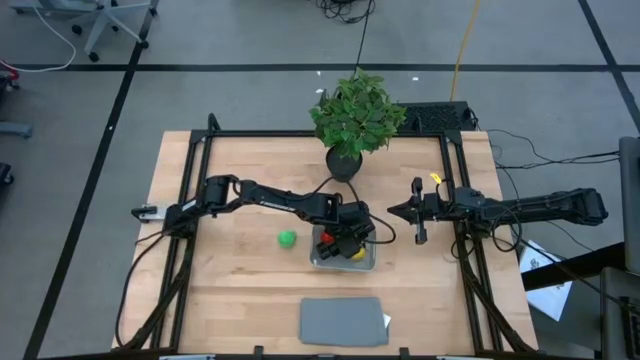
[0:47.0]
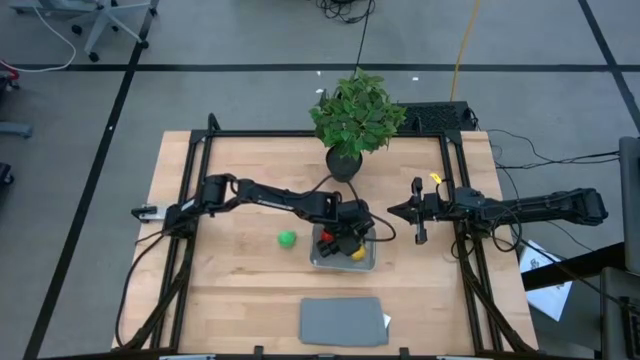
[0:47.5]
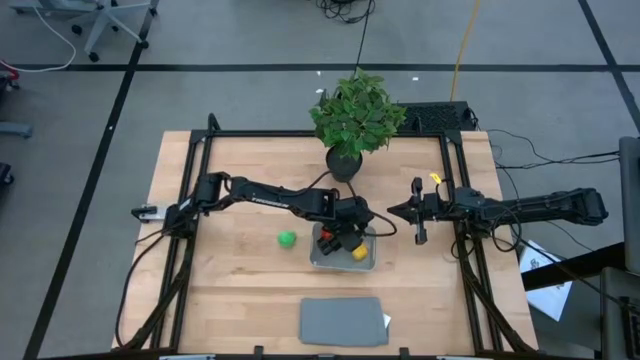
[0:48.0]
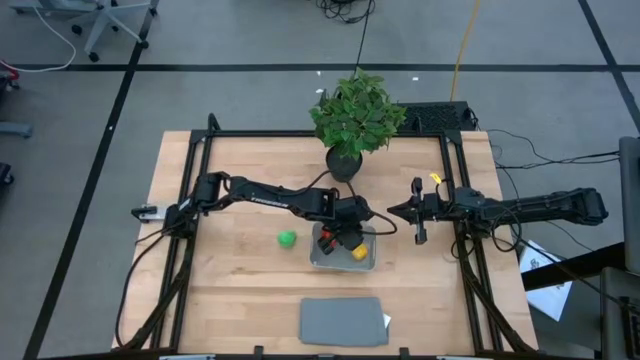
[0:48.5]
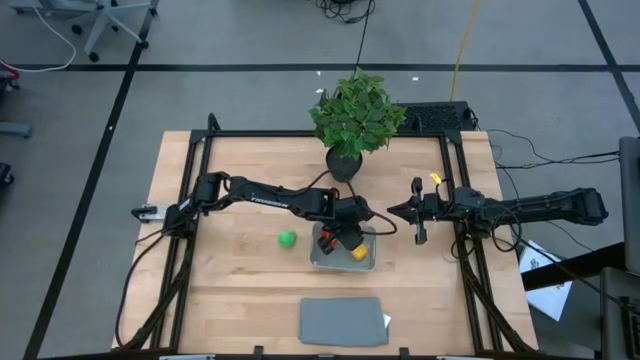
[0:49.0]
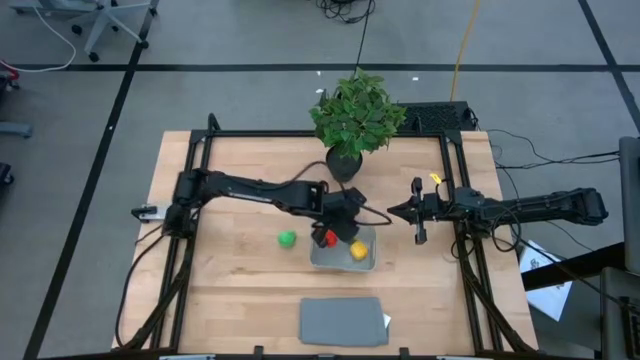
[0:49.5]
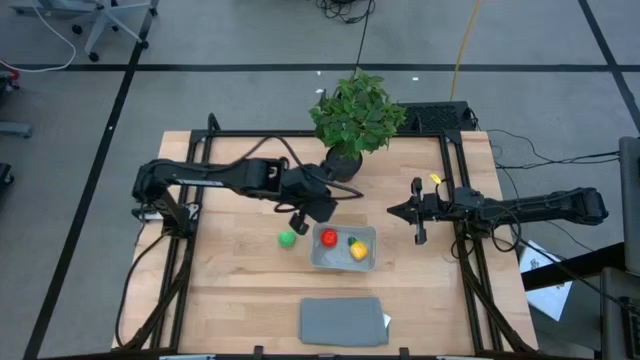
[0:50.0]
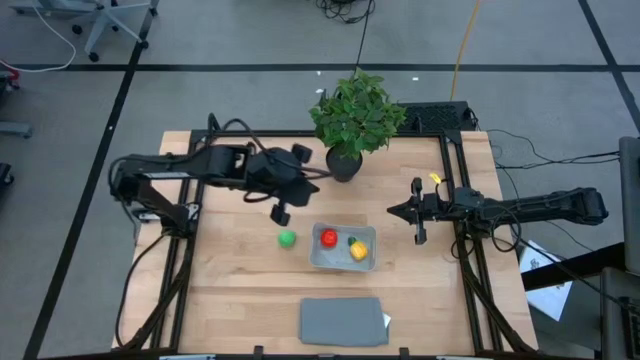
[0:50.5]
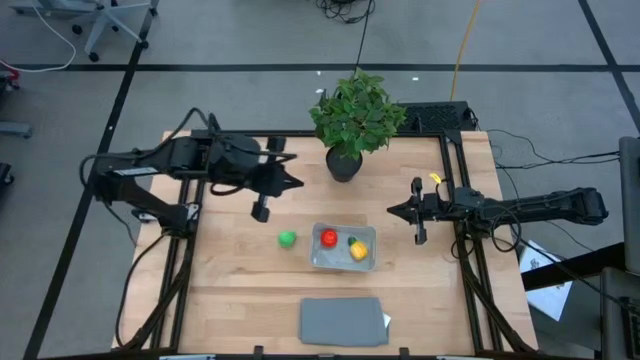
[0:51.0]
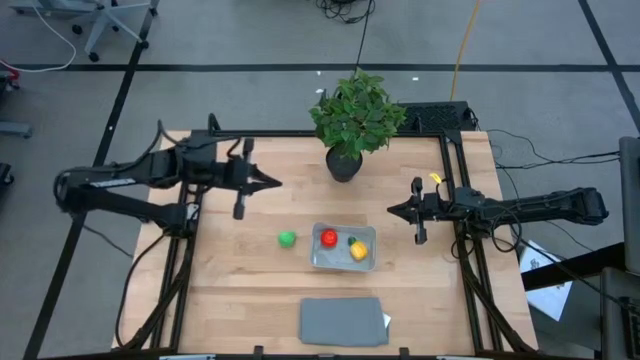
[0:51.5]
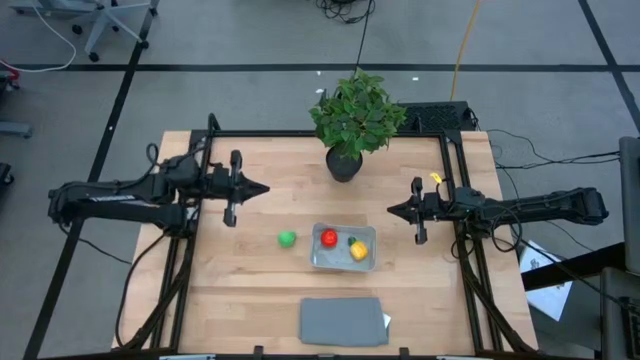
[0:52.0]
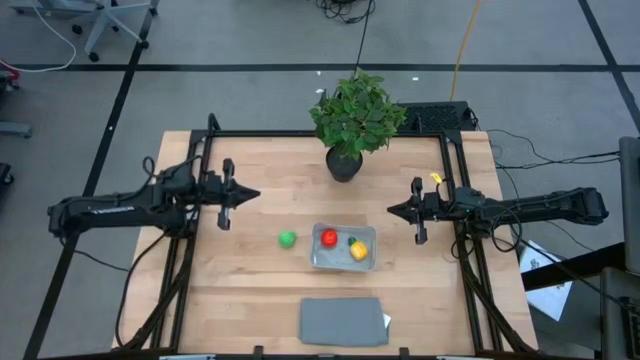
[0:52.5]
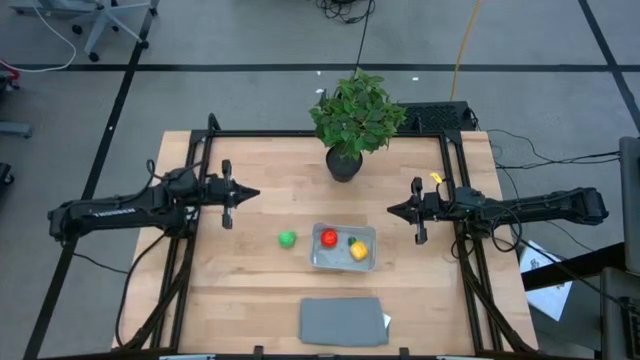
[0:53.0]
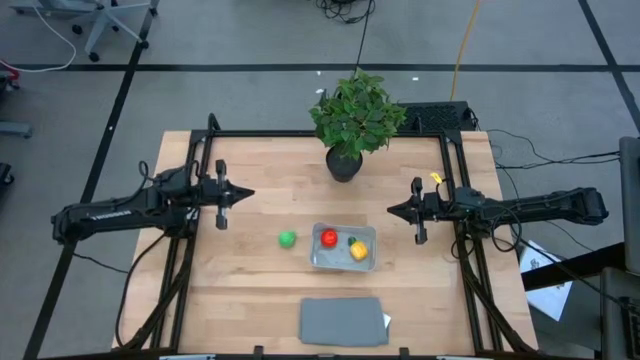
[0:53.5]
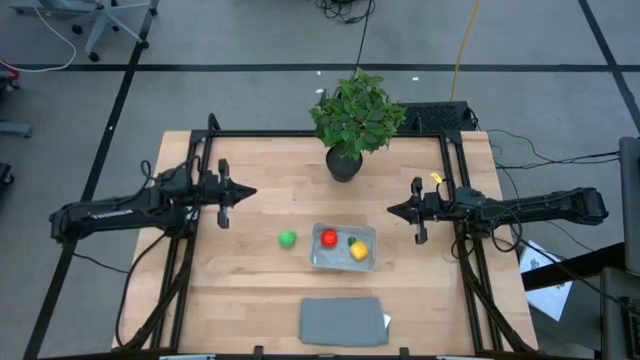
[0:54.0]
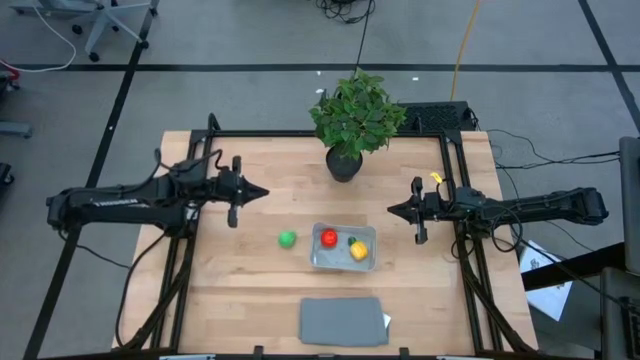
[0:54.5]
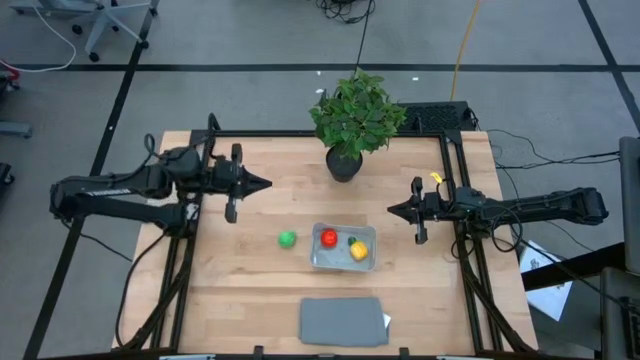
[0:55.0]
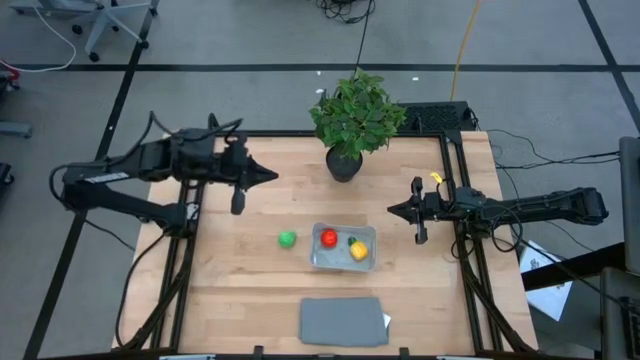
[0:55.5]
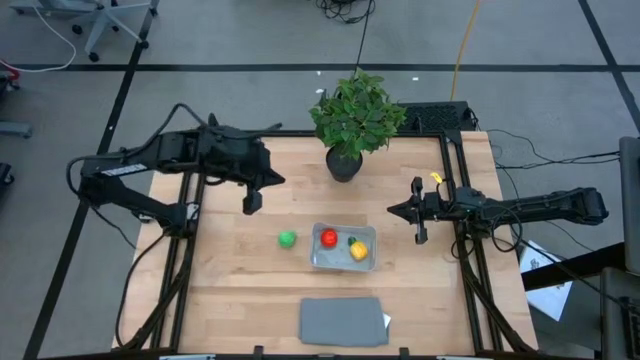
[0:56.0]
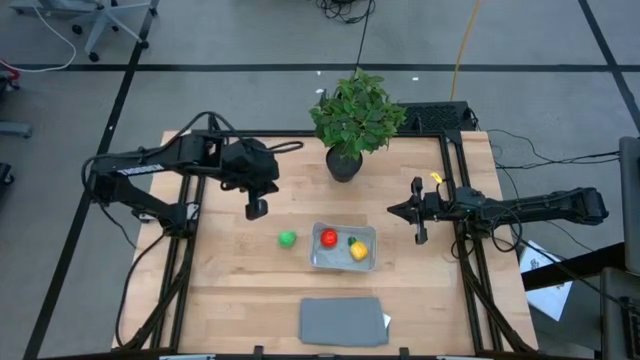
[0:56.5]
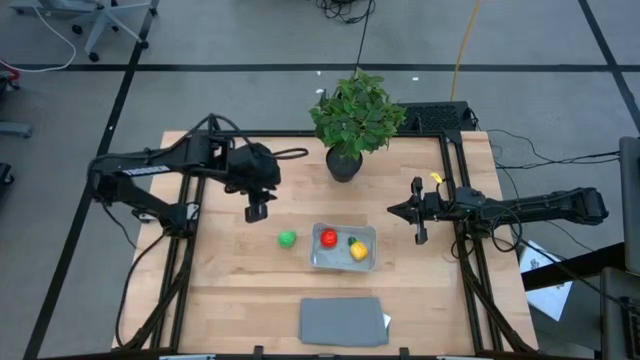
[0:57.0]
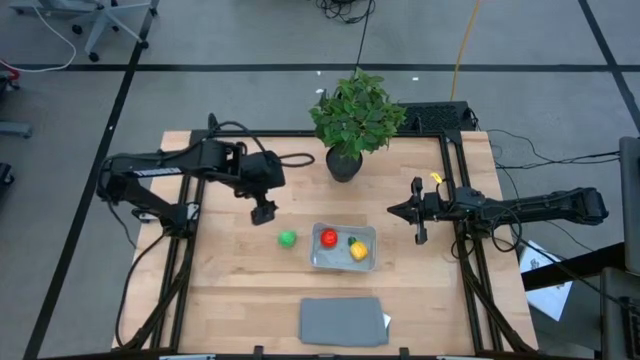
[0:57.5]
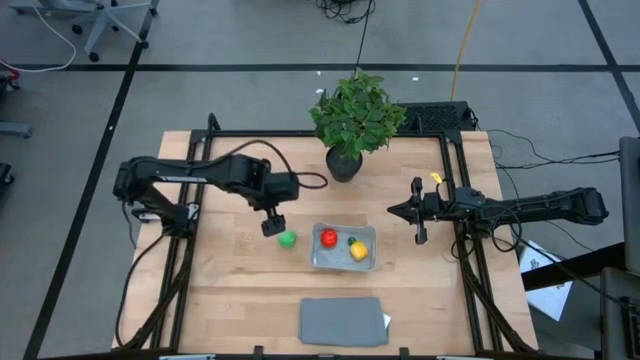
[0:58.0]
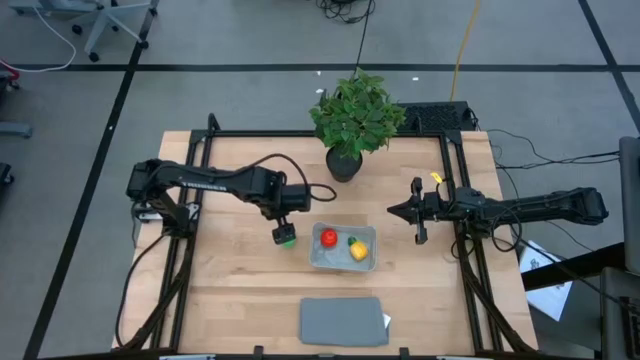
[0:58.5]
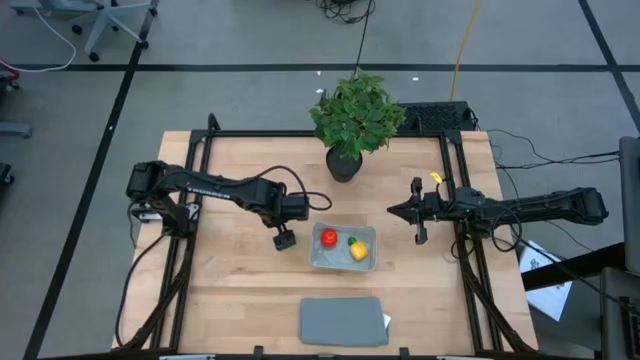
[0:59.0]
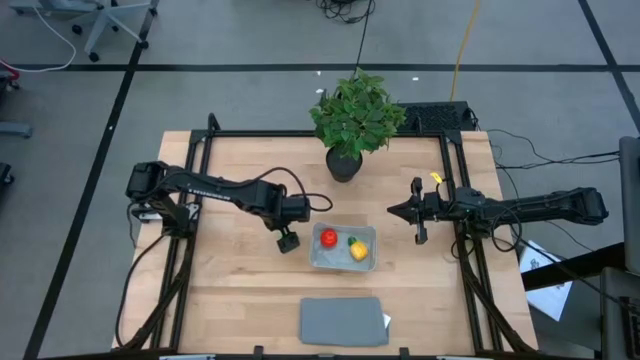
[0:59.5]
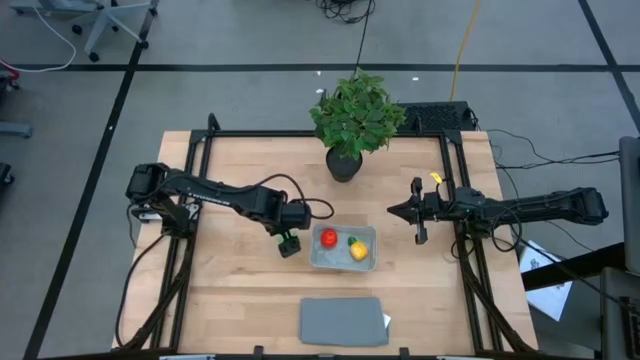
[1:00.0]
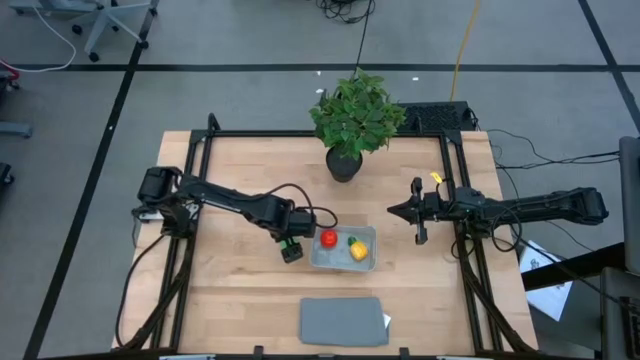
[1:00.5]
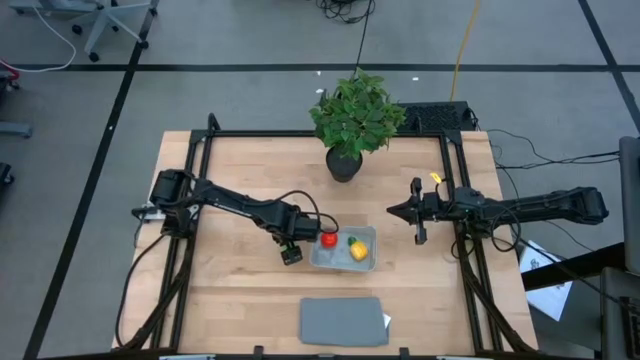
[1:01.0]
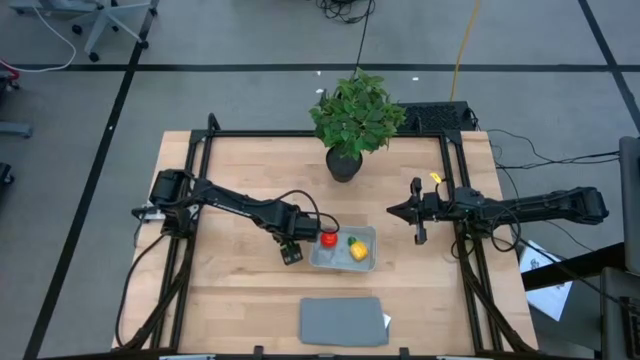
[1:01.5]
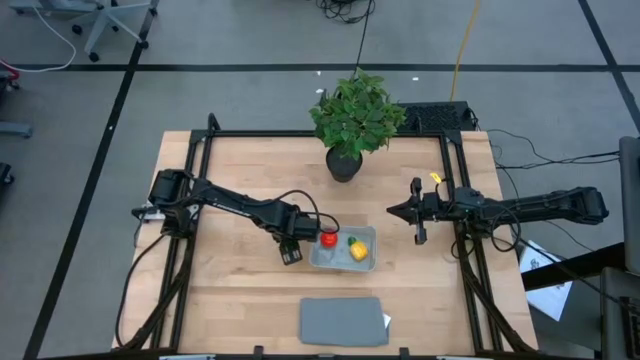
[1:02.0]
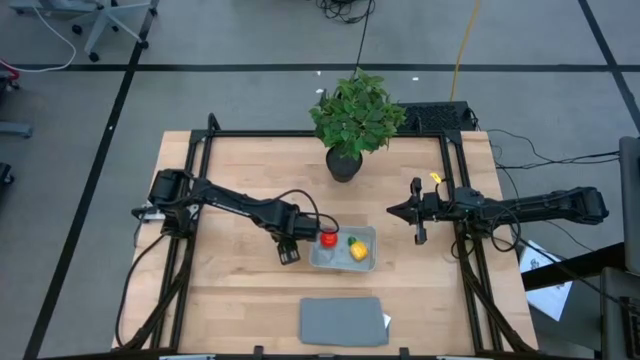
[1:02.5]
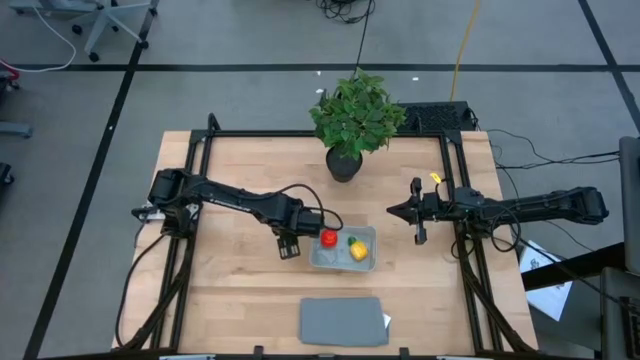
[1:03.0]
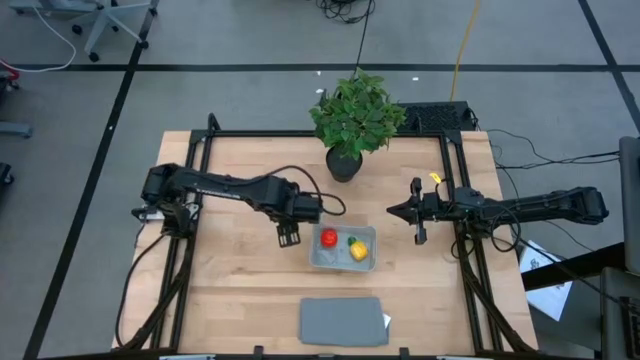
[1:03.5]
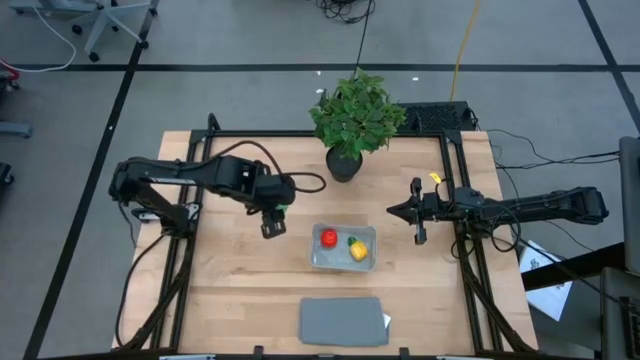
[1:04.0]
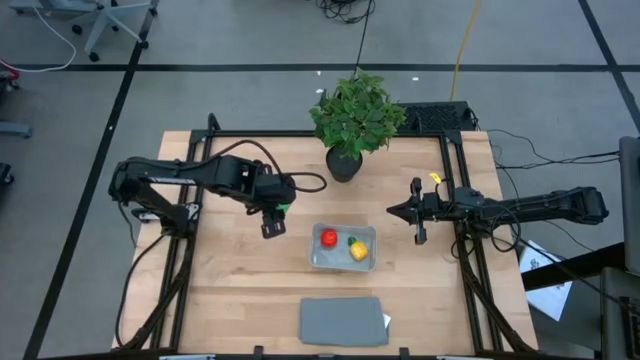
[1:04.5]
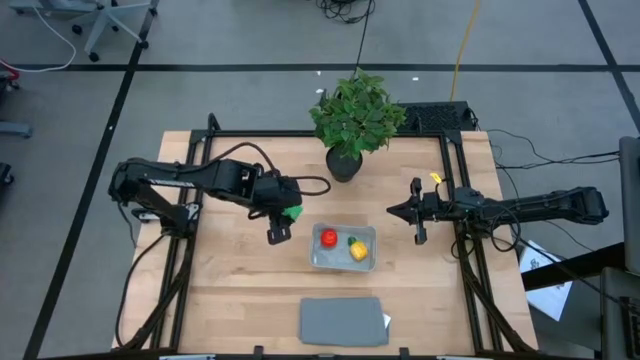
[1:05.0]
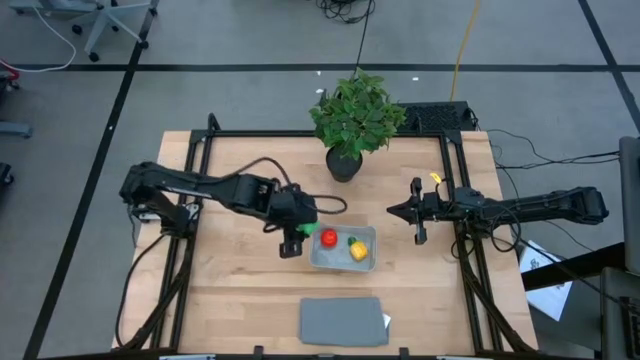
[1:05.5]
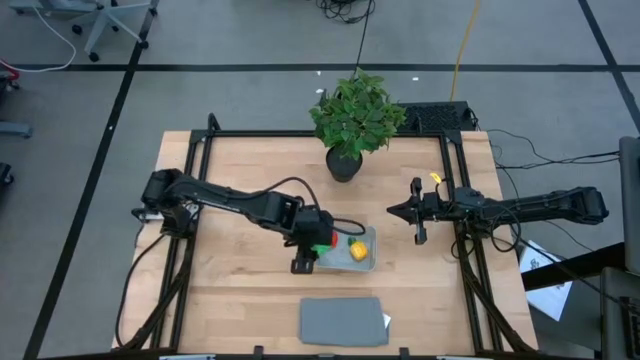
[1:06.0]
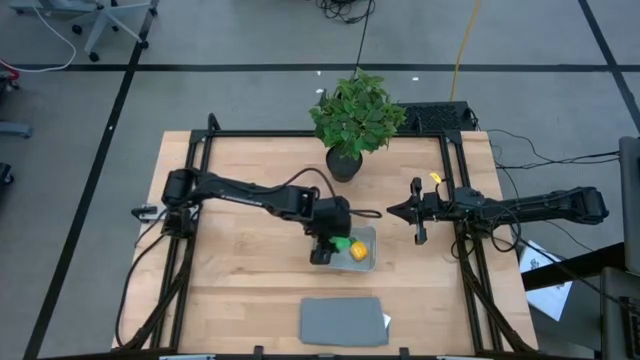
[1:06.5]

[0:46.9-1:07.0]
Task: Pick and placing Produce into tupperware
Put the pear into the basket

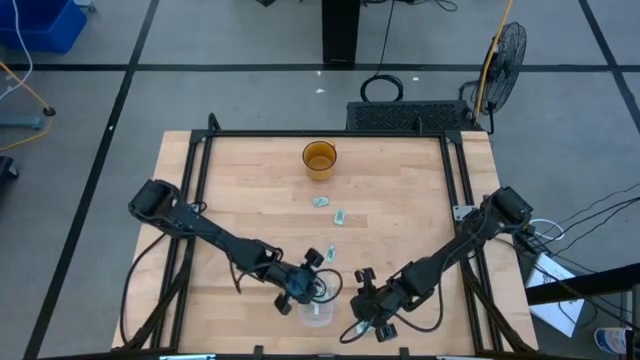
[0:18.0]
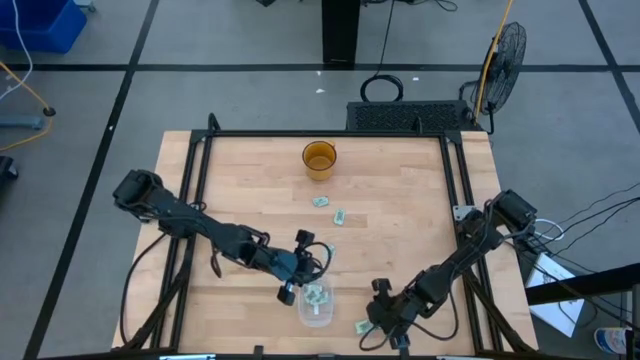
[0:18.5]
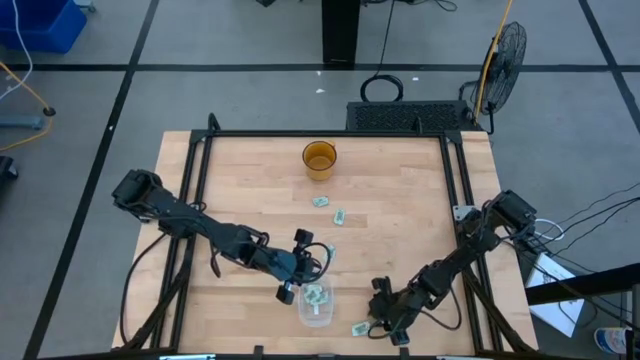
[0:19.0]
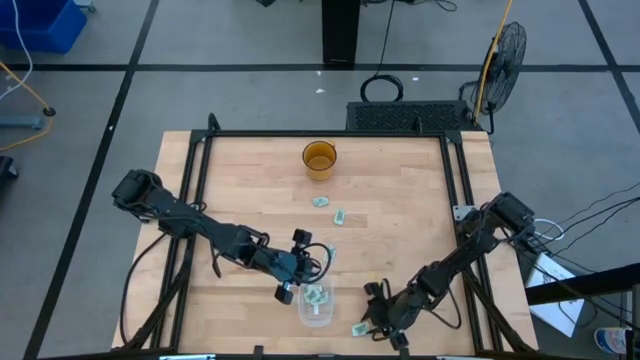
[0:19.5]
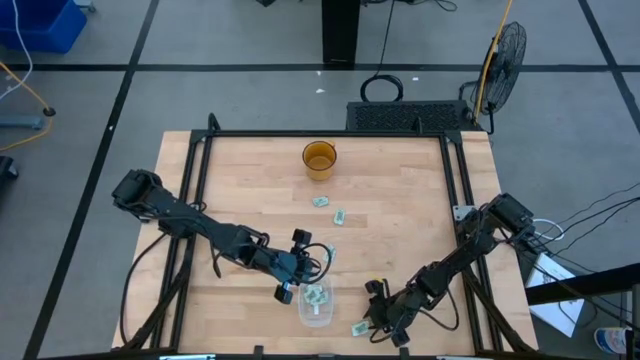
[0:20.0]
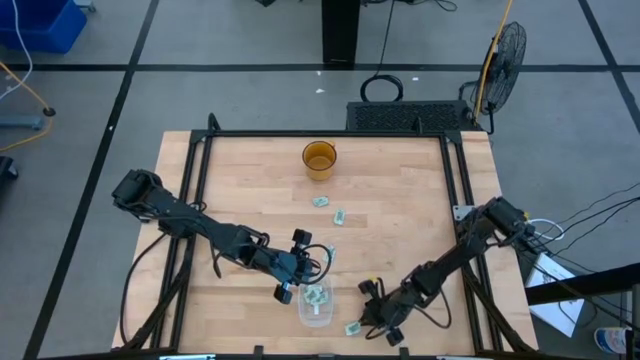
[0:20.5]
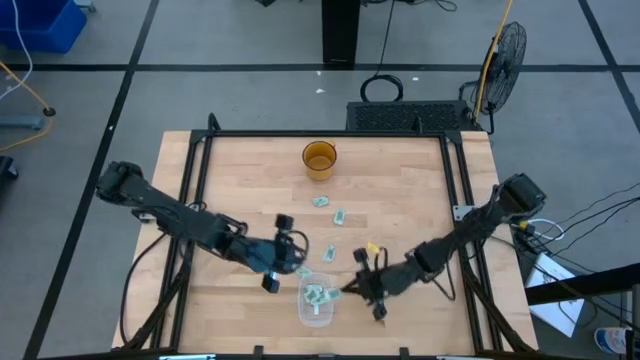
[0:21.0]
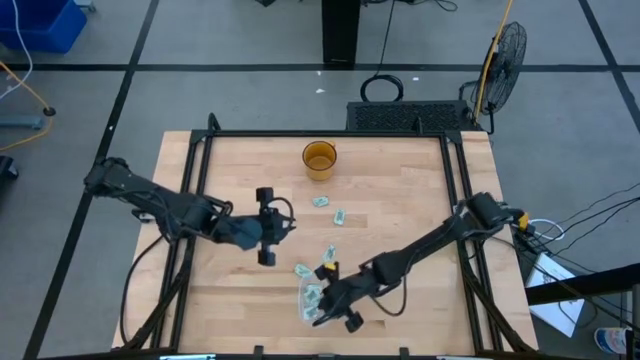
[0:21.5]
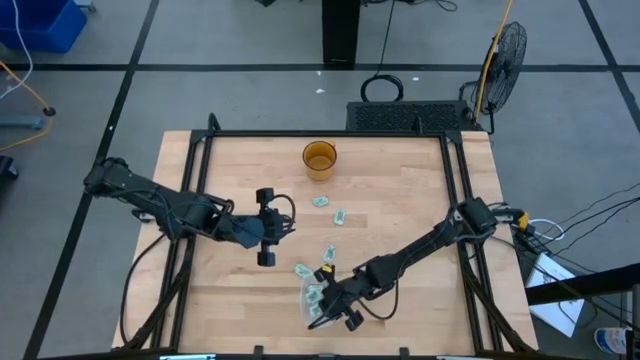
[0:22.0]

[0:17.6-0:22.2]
Task: Pick and place Stevia / Truvia into bins
Put the green stevia packet into the transparent container
